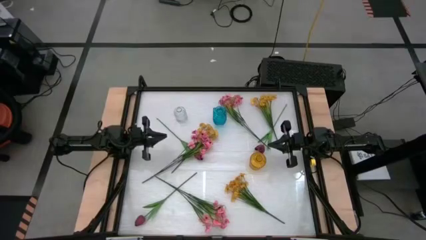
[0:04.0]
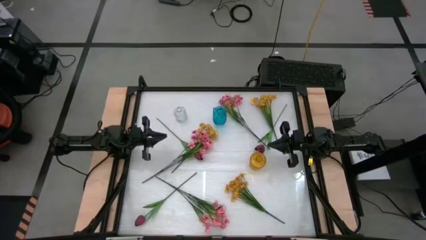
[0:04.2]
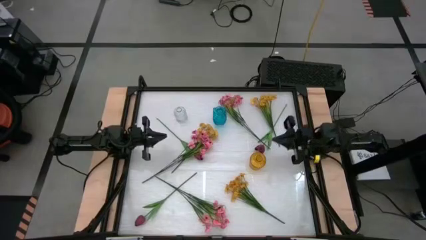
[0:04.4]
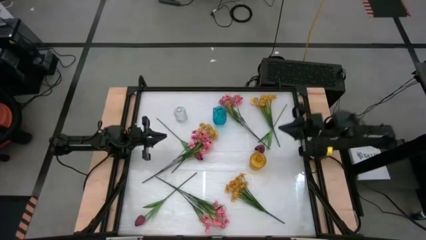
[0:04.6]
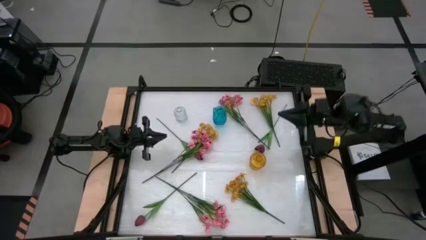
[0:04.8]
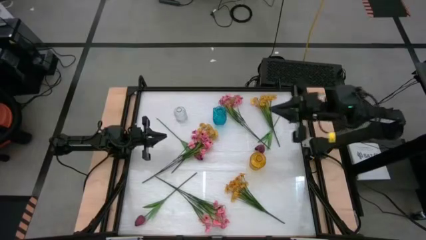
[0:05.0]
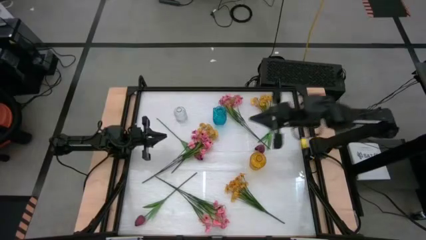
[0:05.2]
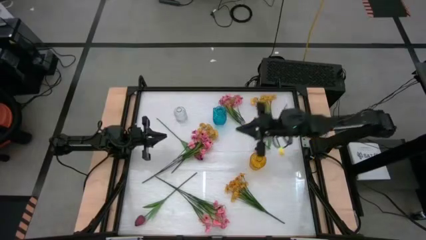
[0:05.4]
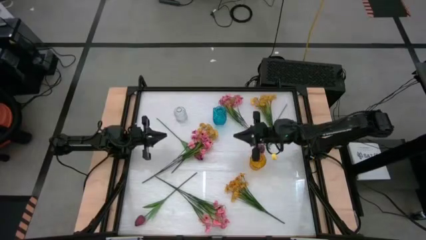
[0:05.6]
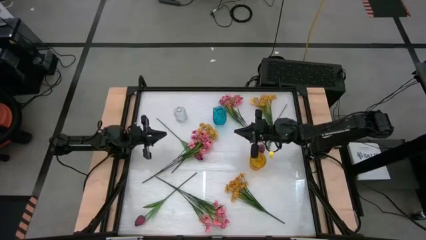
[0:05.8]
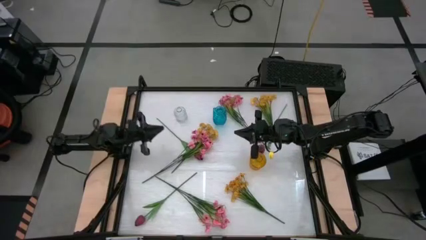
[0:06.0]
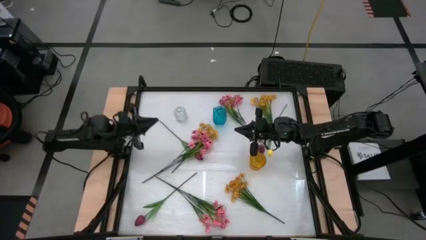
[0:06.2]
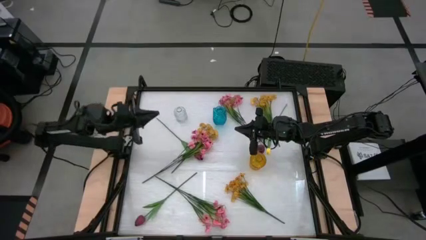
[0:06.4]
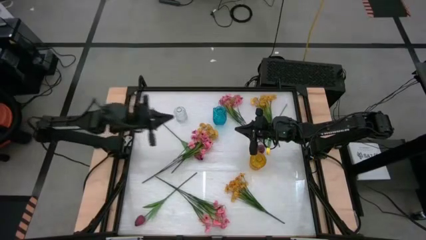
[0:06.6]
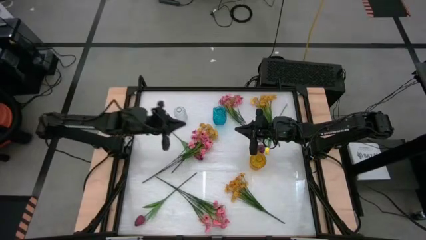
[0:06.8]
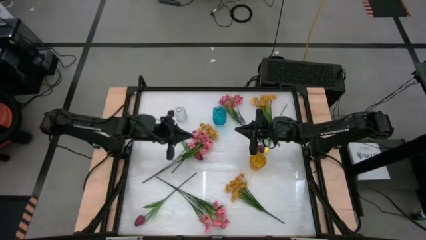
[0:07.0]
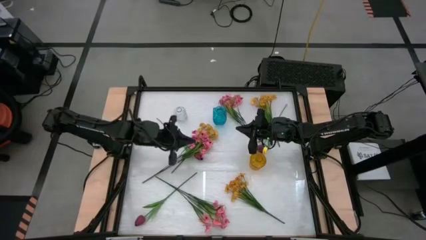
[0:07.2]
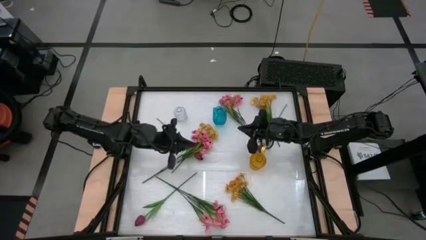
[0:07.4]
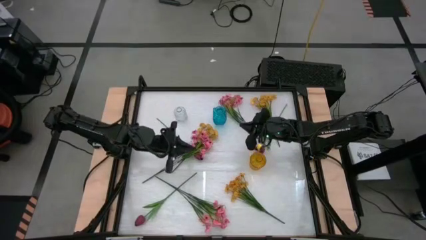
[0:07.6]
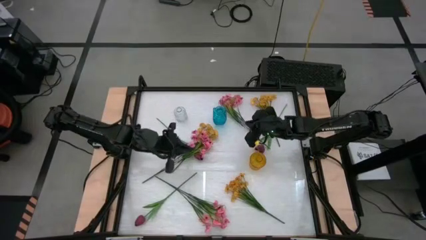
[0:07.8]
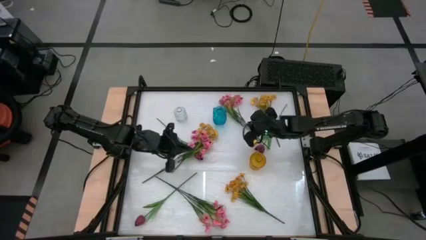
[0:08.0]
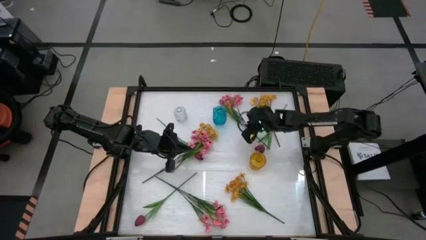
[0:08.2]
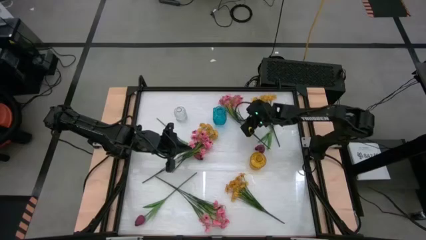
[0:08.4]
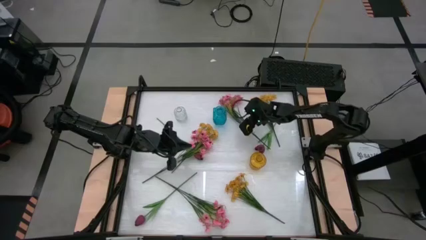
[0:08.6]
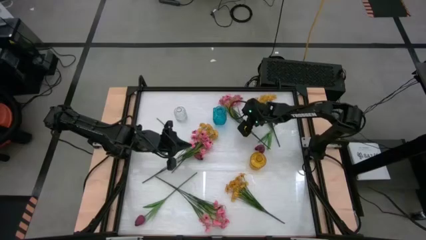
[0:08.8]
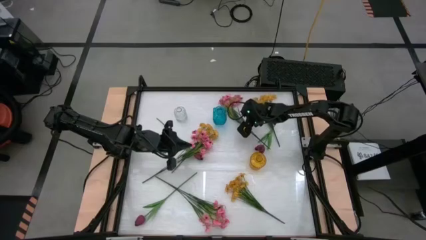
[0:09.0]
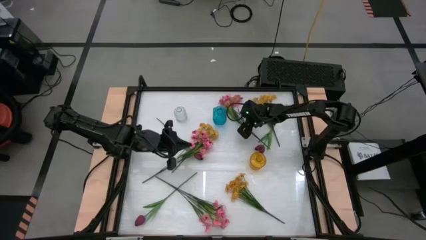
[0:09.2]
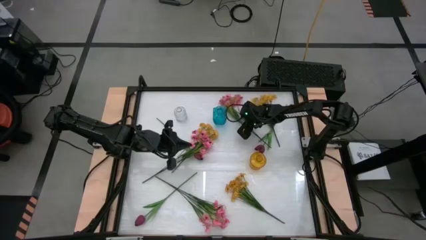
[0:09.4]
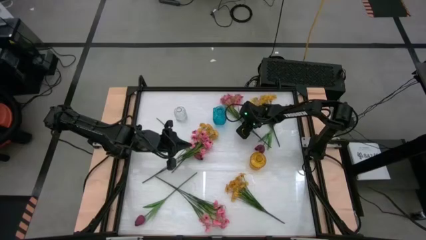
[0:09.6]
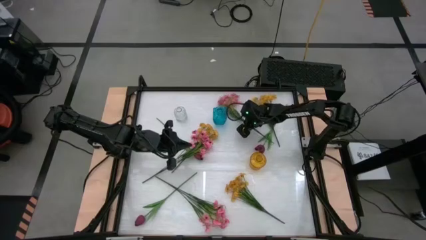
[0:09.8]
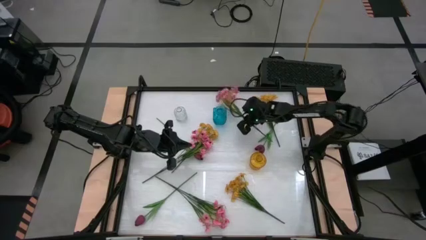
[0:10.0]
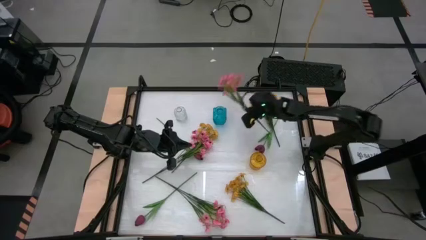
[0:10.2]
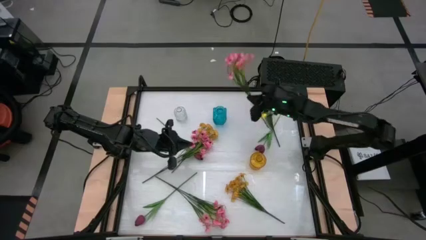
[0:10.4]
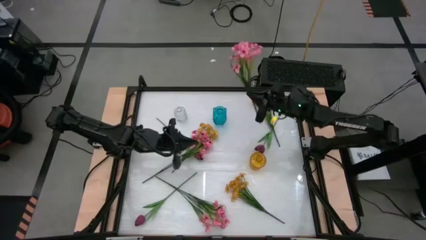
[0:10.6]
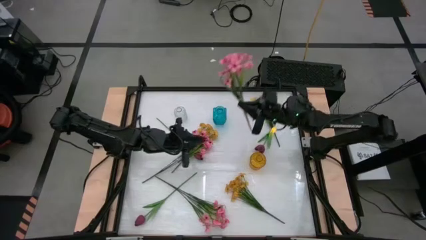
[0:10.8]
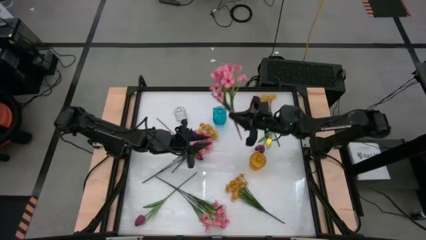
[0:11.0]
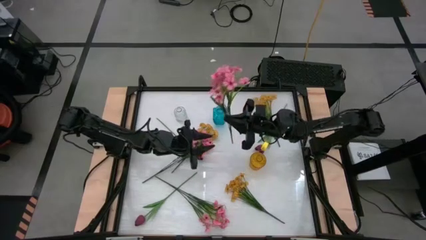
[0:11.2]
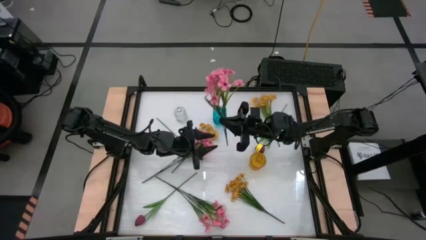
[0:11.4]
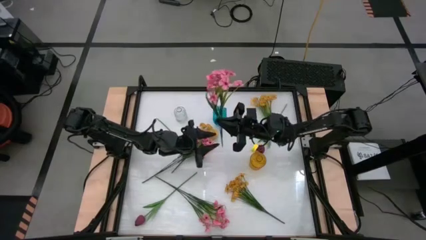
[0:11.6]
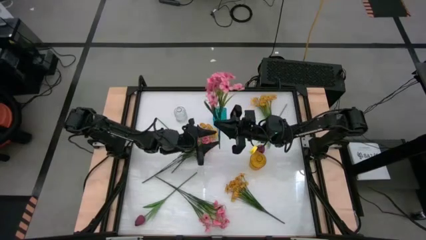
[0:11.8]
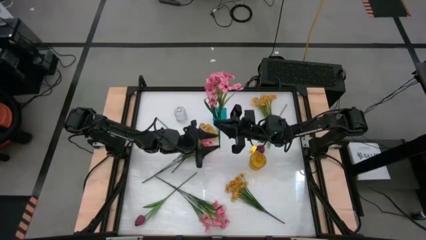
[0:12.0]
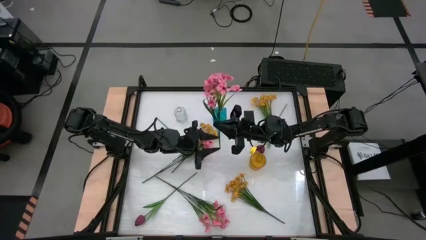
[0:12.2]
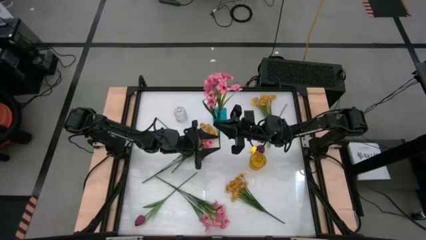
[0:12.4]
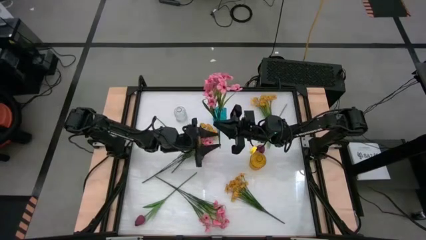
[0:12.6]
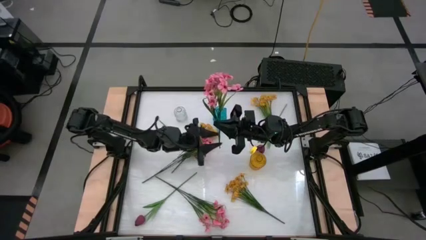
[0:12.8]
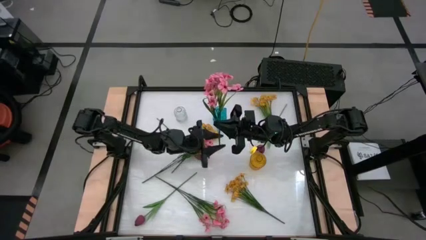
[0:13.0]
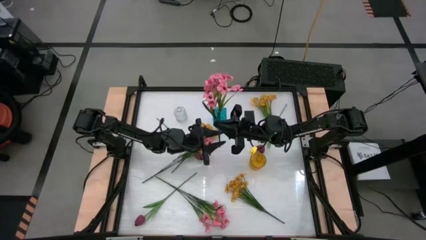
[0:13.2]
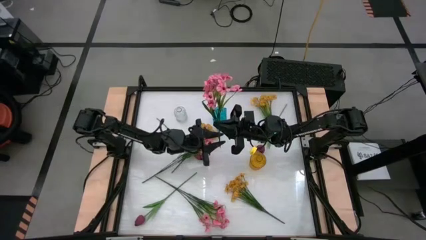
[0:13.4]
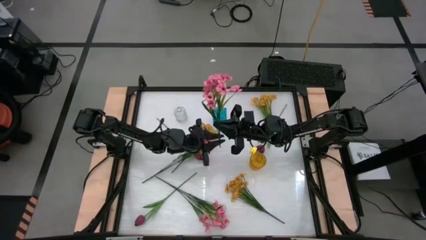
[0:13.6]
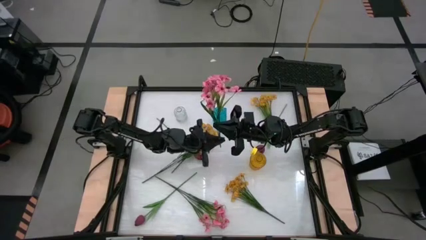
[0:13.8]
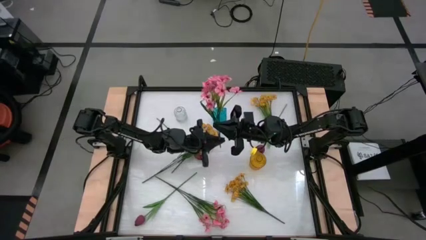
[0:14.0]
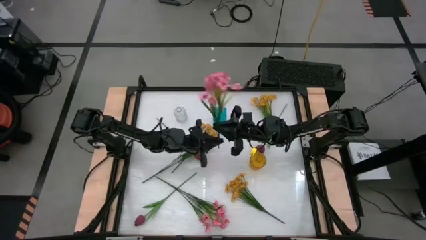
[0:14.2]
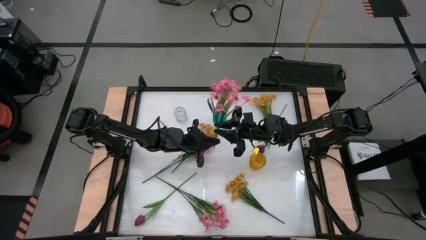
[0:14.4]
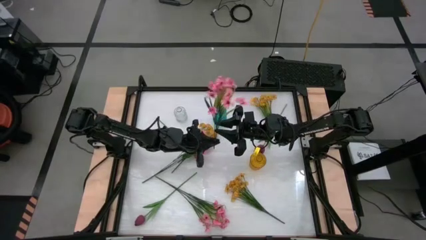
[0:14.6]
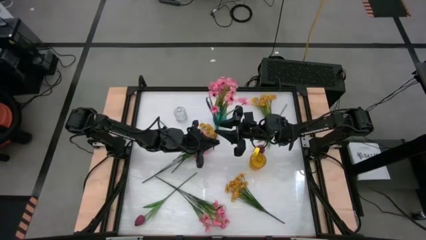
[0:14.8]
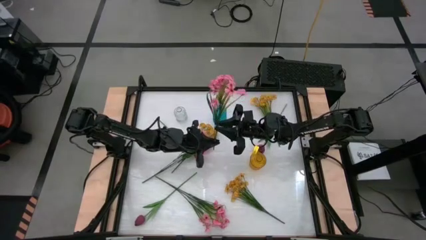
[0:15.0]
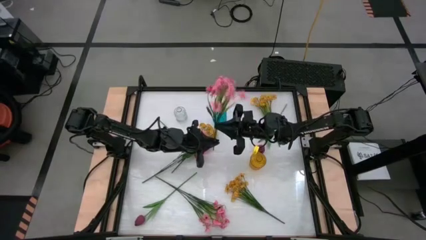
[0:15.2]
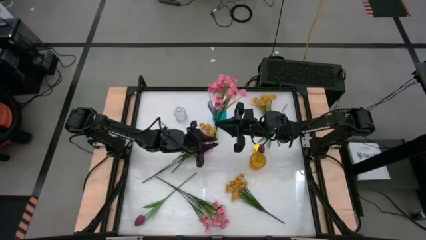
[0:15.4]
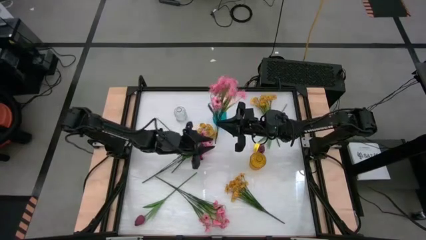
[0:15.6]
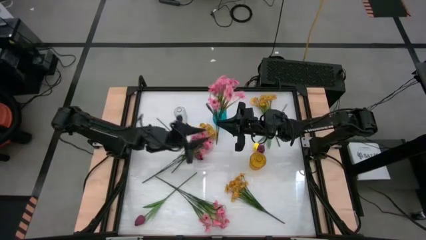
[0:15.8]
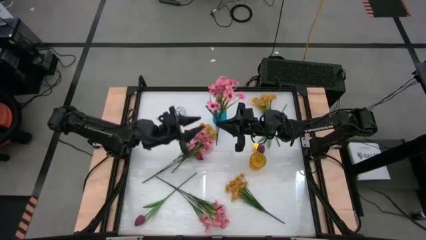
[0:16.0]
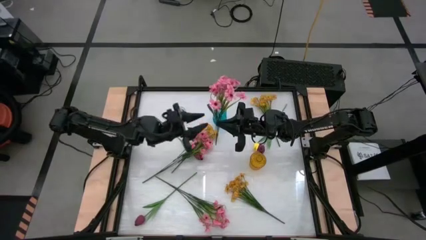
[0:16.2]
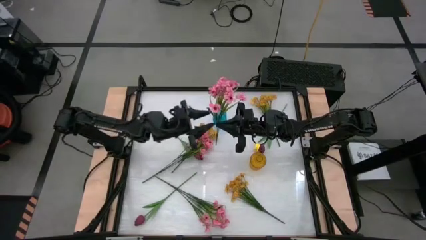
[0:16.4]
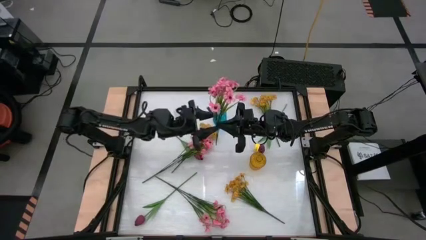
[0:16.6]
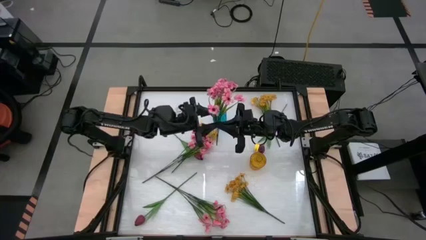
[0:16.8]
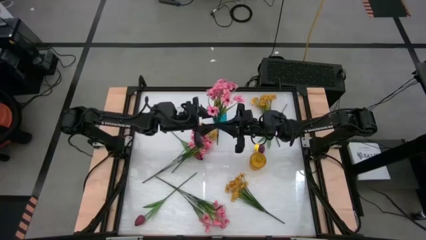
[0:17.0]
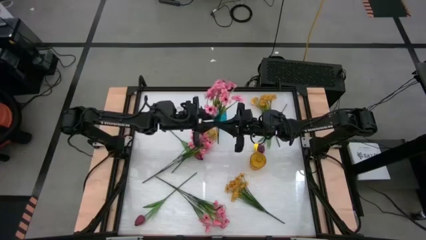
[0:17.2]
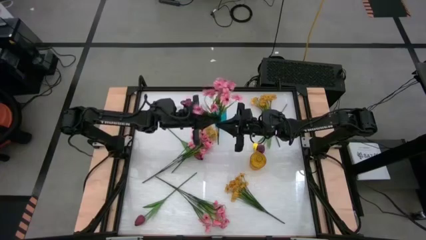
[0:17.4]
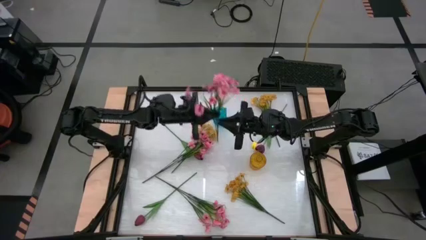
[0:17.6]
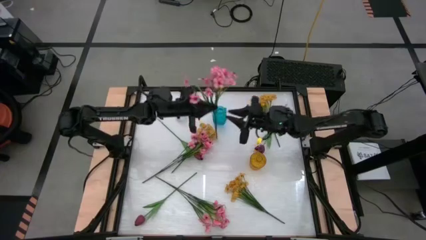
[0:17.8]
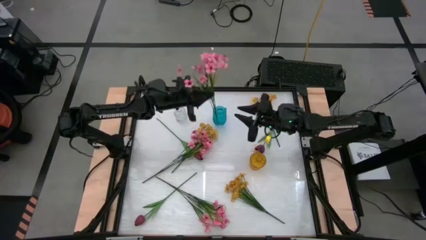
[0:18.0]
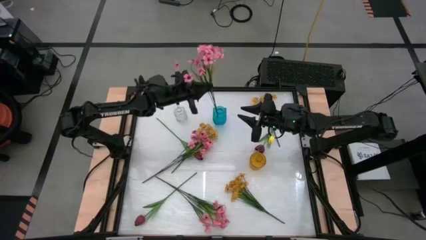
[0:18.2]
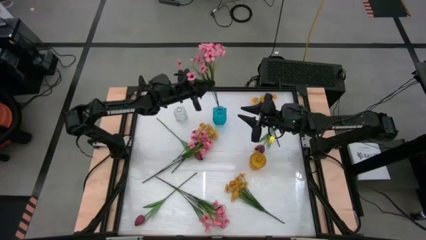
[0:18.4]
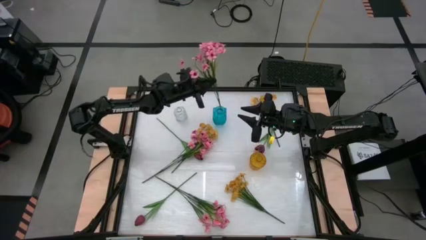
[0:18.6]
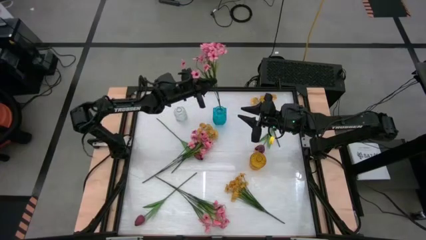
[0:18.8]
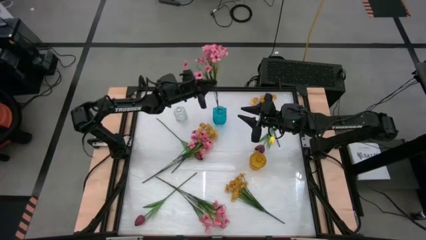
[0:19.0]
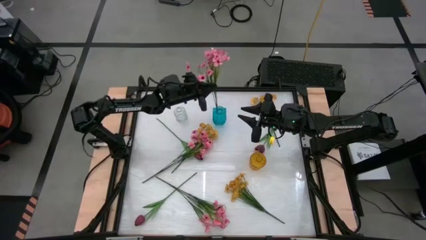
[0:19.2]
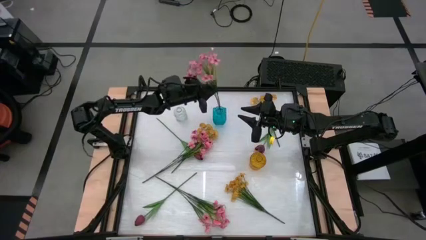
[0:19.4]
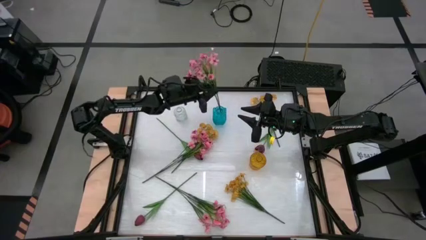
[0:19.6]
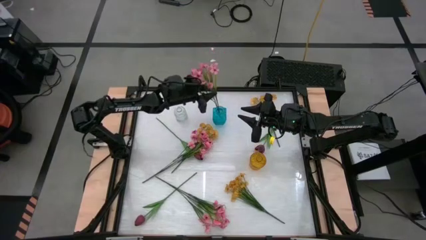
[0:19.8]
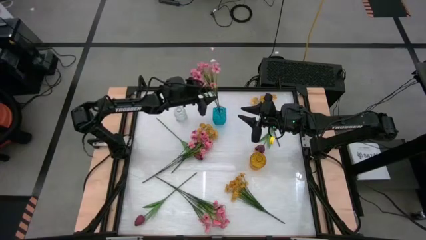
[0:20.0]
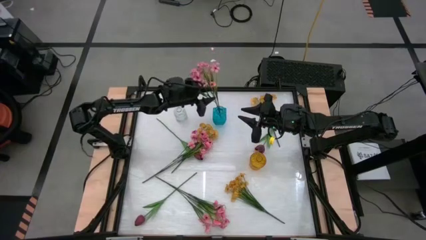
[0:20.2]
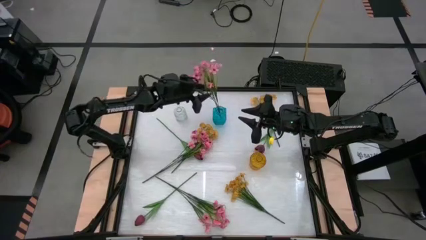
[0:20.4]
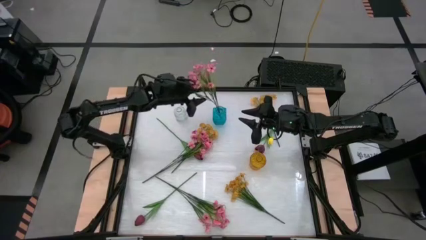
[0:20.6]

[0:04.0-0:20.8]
Task: Sort flowers into vase by color
Put the top pink flowers into the blue vase
